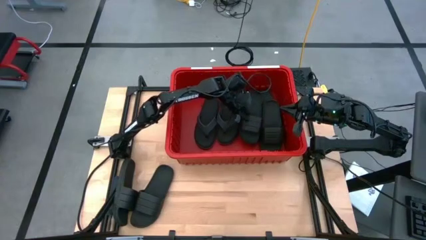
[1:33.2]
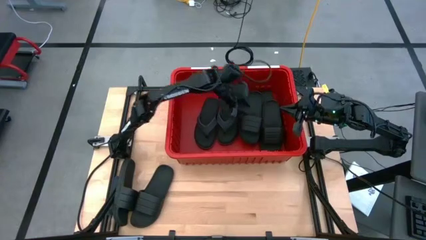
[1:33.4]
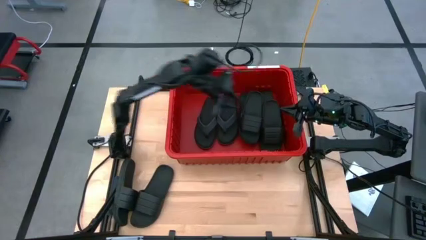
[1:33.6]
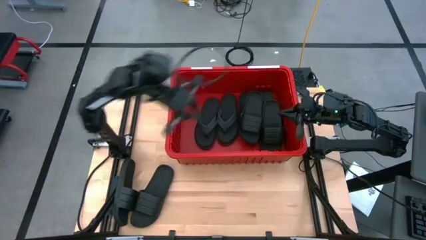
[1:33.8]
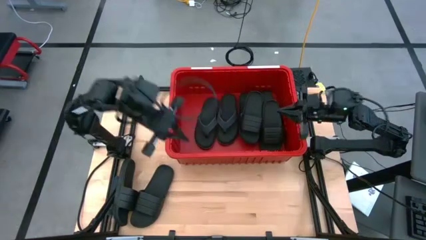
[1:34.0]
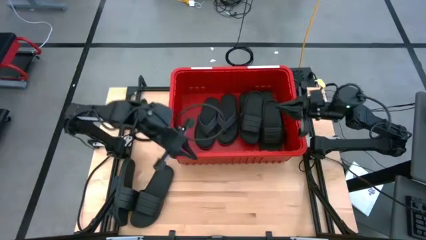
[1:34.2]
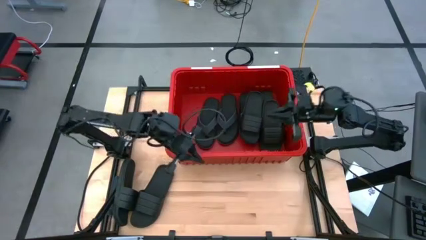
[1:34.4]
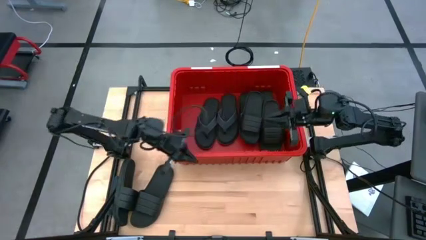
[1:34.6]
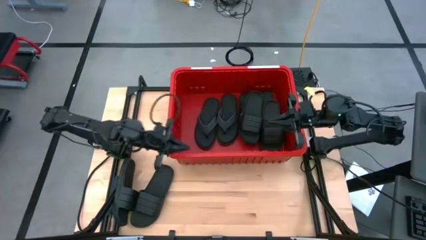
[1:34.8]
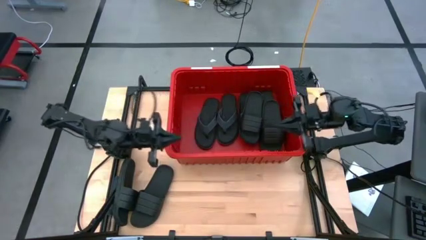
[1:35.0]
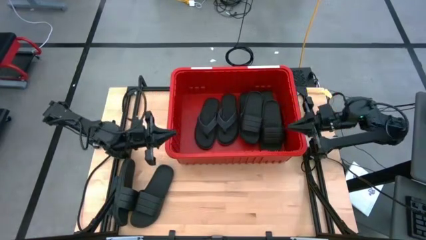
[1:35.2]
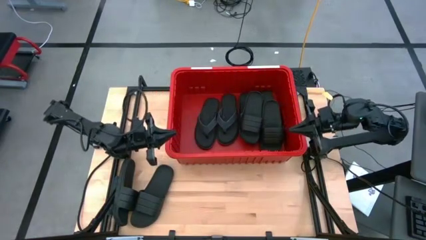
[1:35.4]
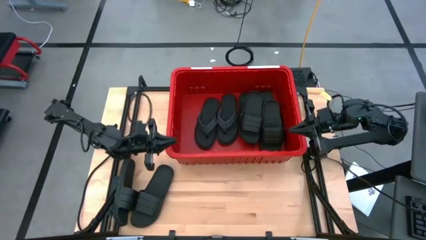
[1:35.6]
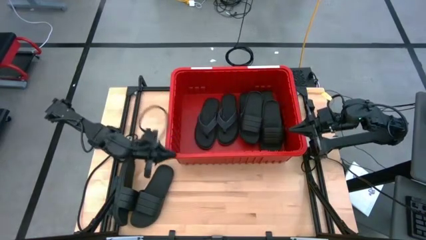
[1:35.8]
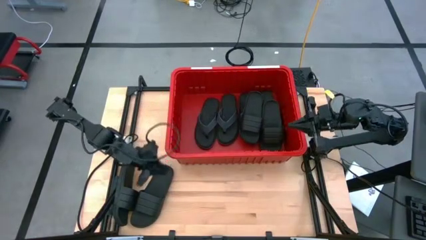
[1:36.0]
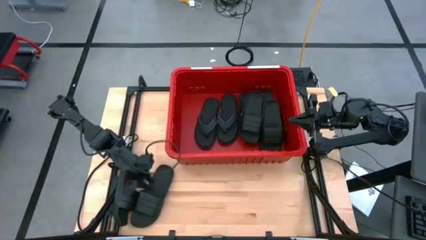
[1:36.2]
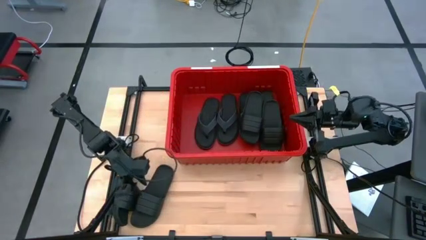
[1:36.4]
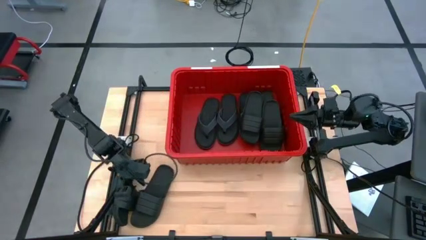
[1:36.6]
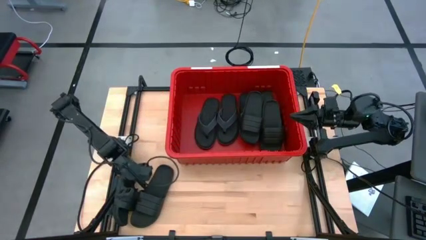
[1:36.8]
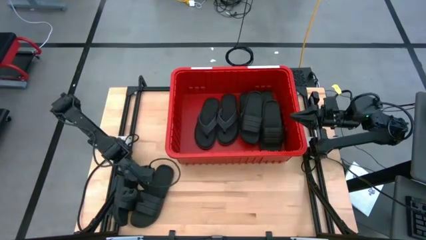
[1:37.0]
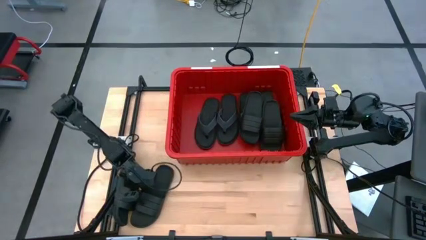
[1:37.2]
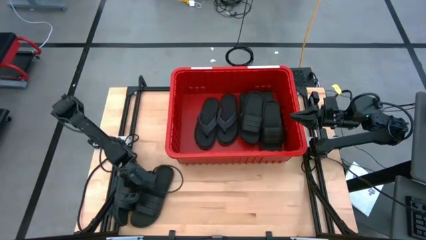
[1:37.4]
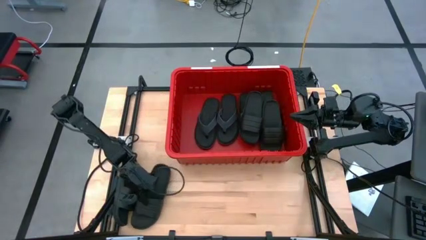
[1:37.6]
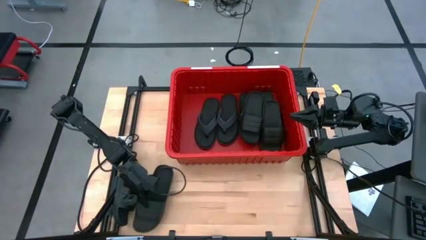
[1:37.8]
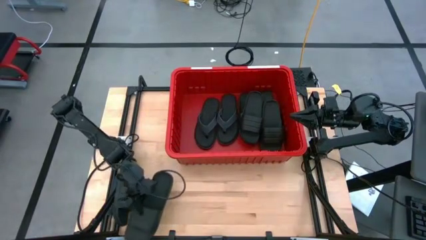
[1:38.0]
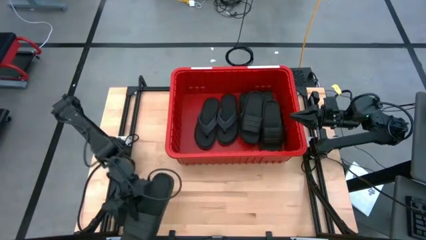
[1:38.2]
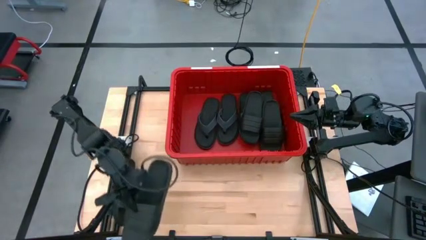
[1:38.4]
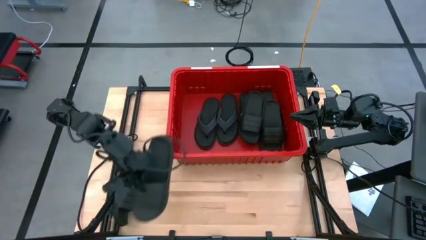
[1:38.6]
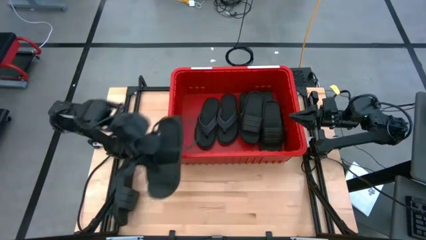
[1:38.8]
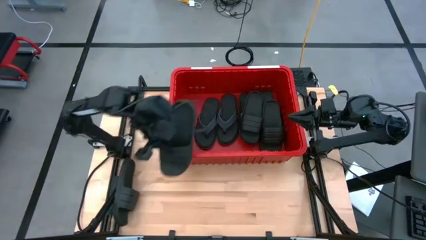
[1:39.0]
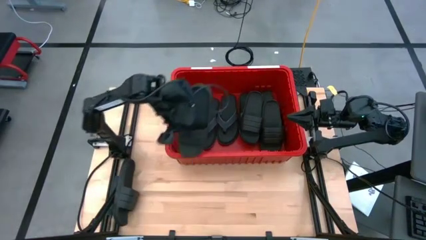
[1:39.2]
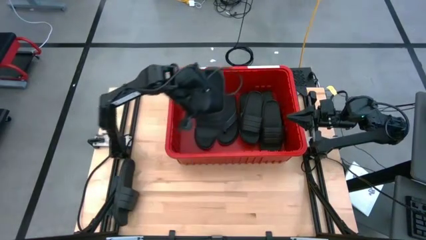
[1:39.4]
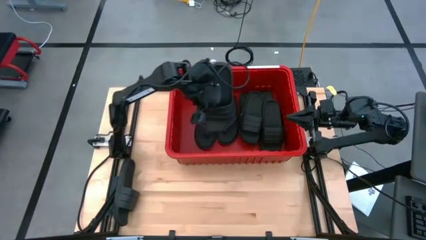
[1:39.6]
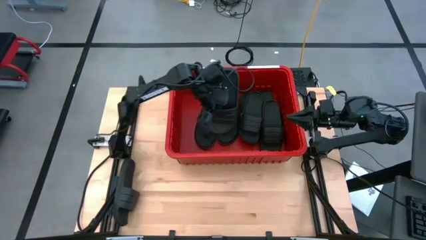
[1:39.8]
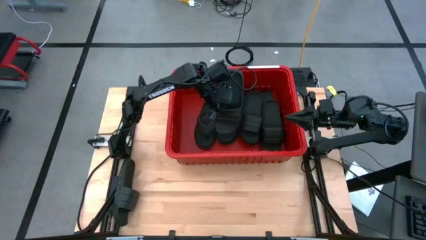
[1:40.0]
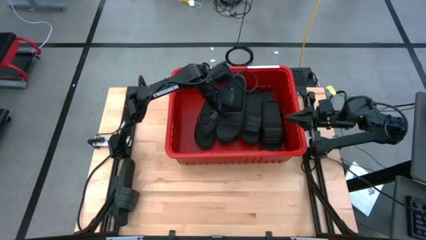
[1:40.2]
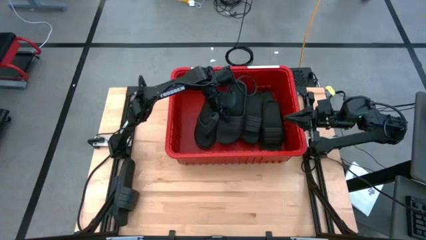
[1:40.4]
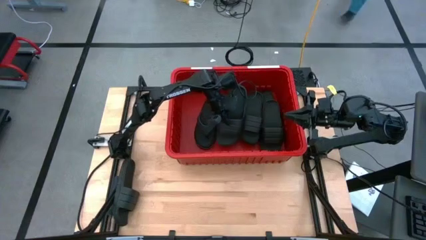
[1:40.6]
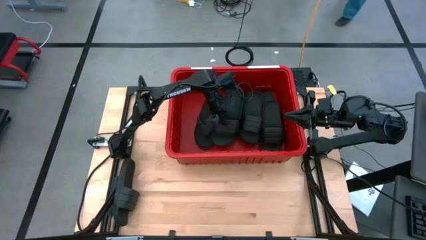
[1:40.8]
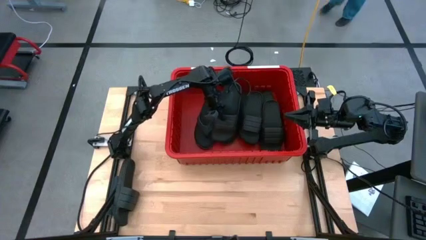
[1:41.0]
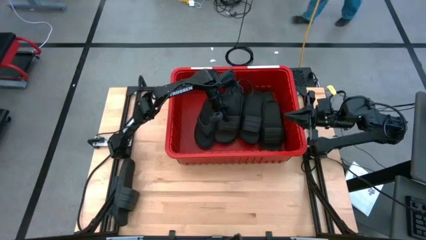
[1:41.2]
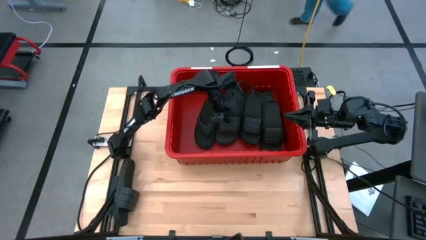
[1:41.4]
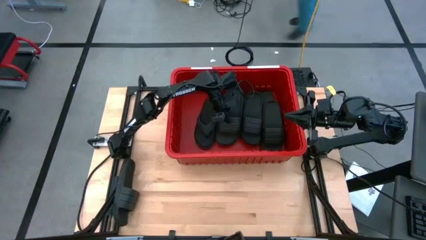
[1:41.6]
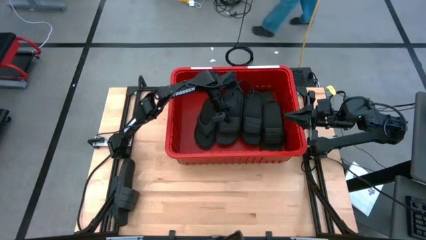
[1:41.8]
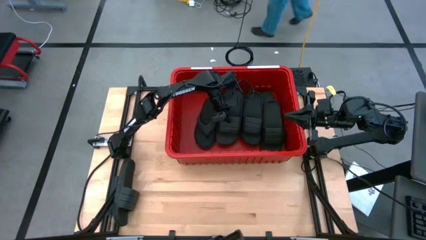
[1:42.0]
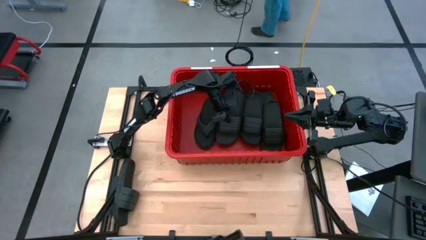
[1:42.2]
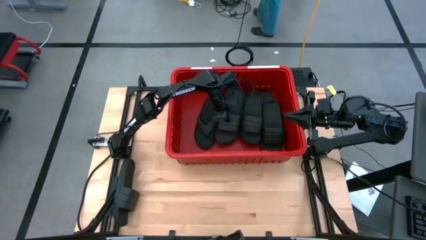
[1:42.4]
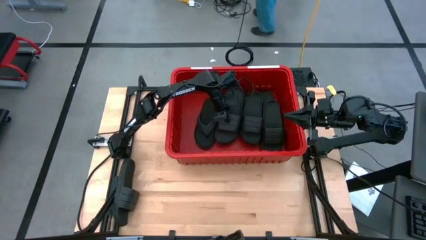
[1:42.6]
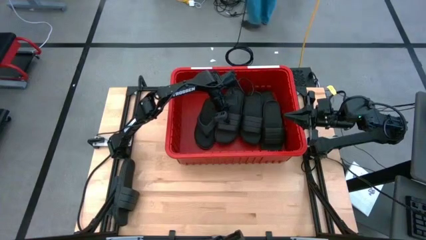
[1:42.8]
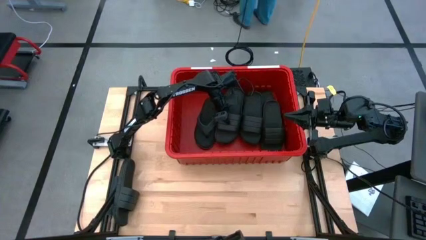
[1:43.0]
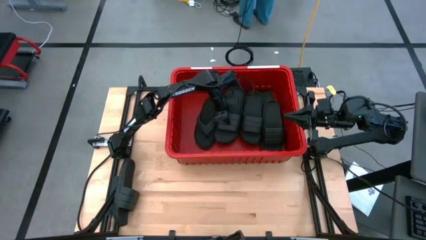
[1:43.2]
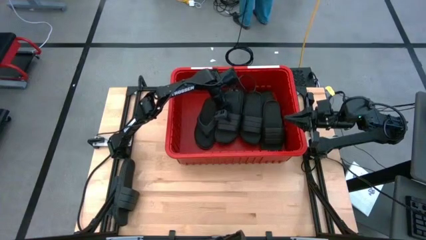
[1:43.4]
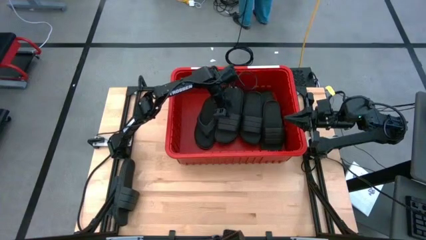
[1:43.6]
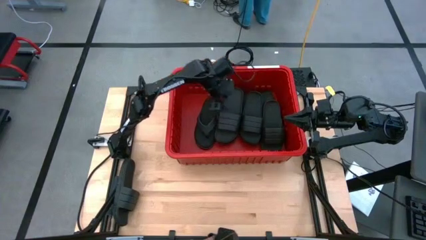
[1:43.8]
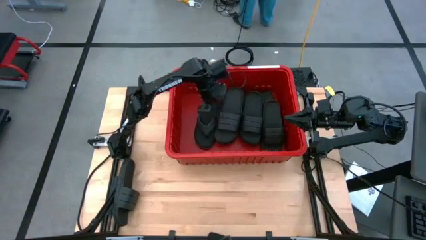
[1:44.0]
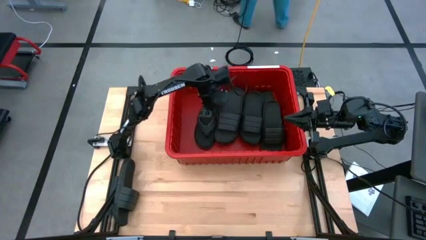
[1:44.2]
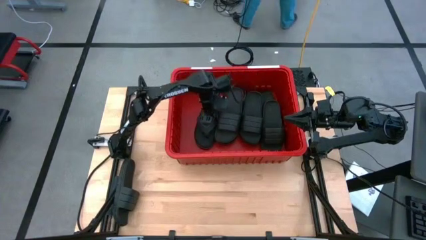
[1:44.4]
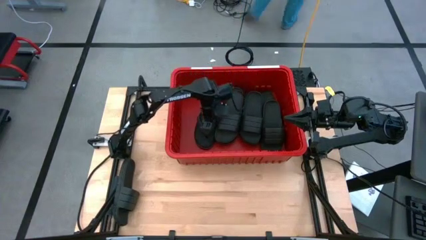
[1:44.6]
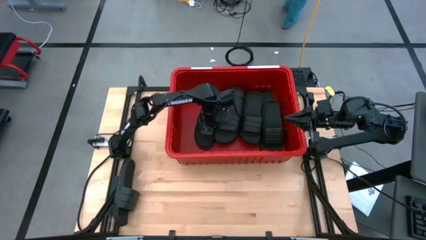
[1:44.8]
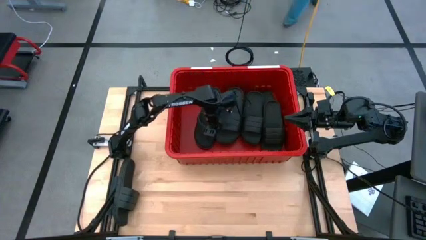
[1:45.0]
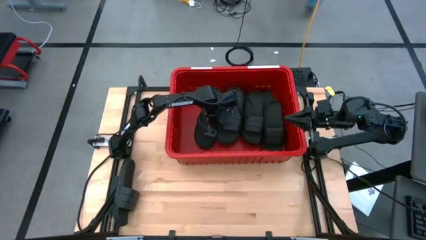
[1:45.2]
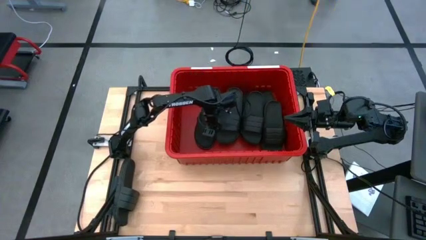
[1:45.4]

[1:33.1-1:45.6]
Task: Pick and place slides into bin
Put the right black slide into the red bin

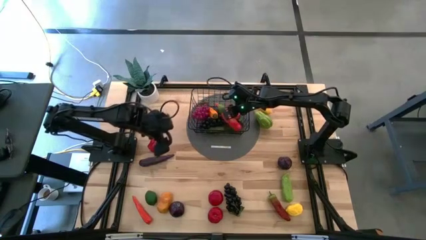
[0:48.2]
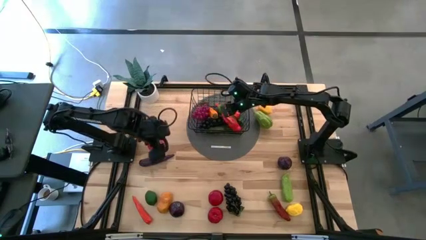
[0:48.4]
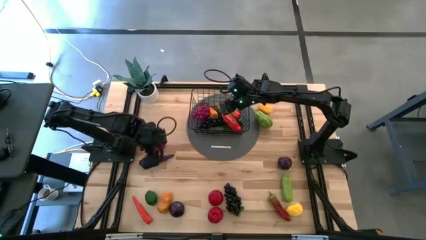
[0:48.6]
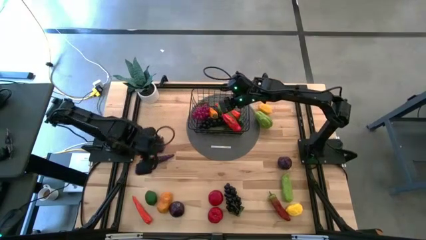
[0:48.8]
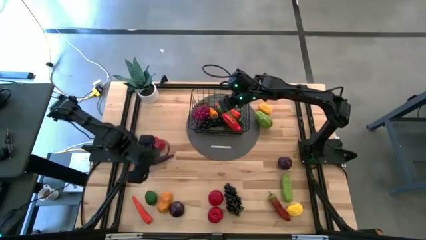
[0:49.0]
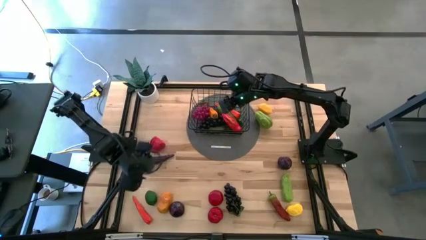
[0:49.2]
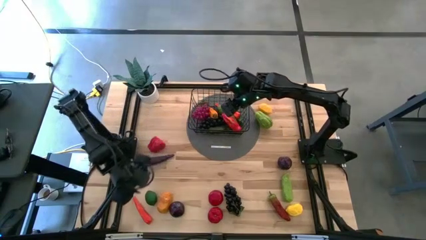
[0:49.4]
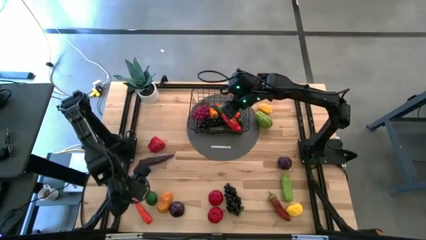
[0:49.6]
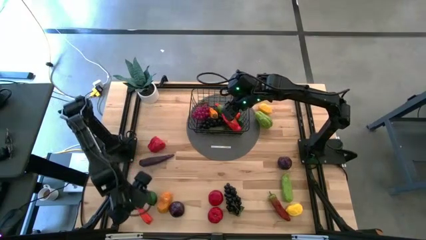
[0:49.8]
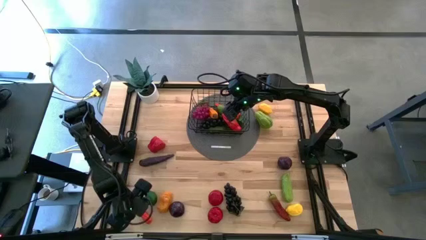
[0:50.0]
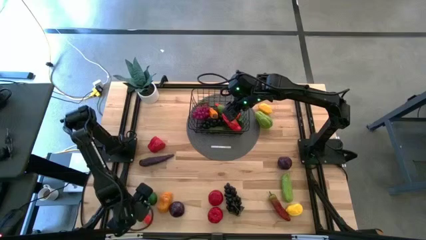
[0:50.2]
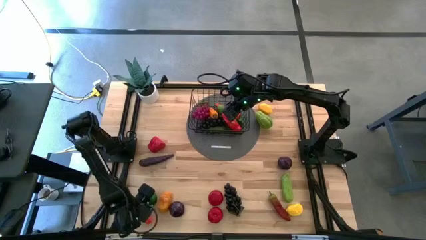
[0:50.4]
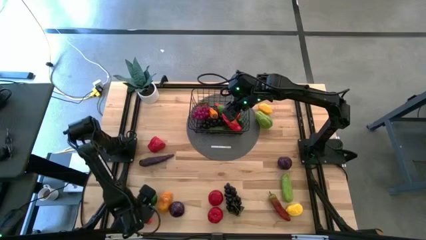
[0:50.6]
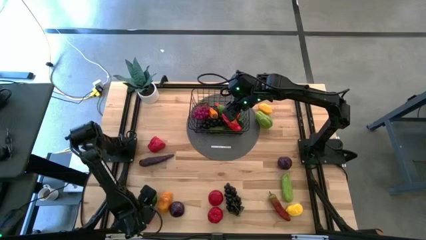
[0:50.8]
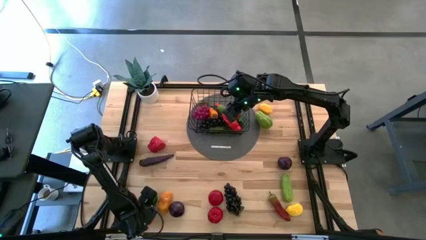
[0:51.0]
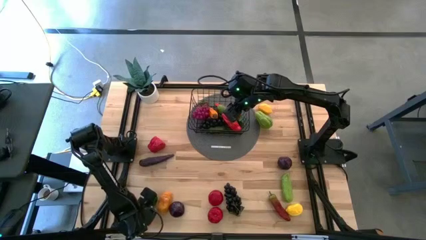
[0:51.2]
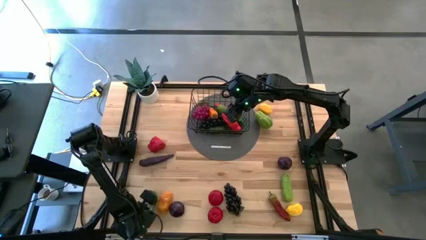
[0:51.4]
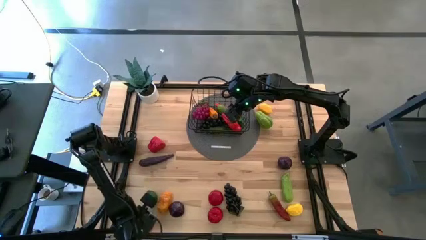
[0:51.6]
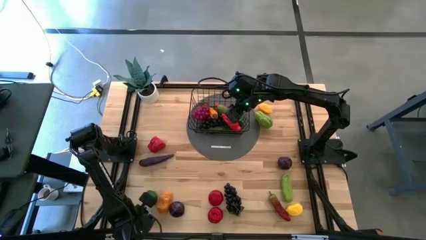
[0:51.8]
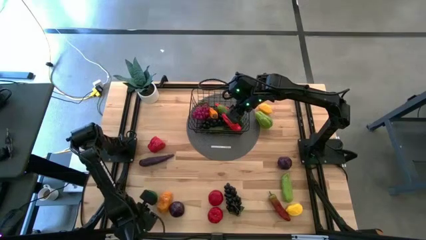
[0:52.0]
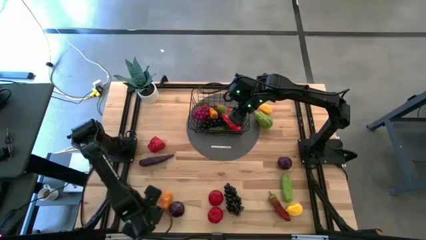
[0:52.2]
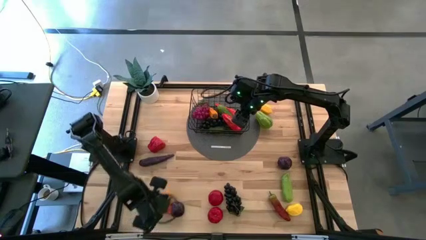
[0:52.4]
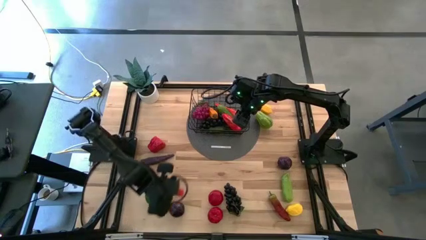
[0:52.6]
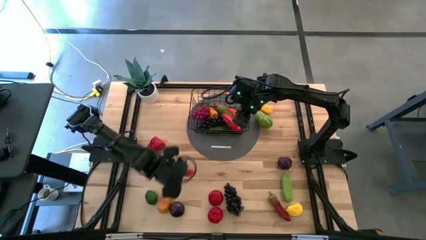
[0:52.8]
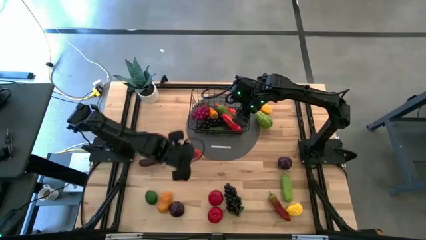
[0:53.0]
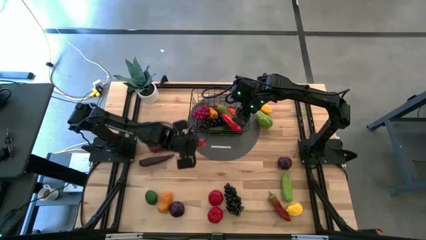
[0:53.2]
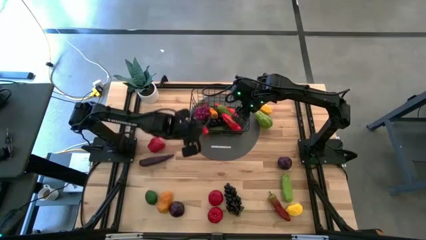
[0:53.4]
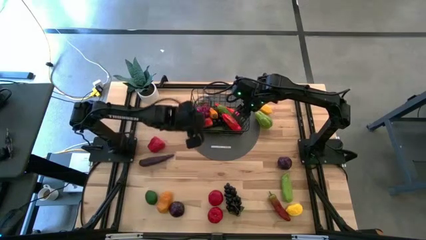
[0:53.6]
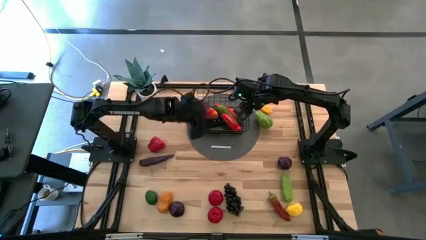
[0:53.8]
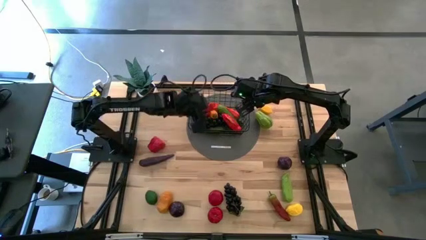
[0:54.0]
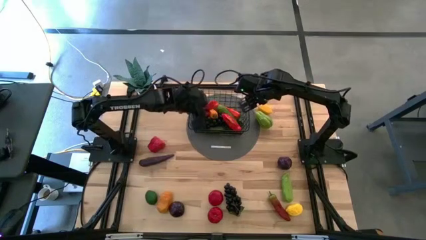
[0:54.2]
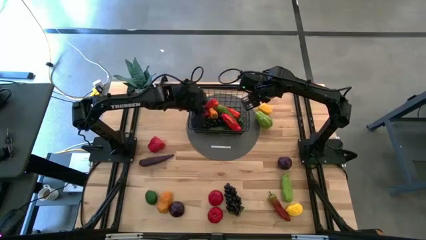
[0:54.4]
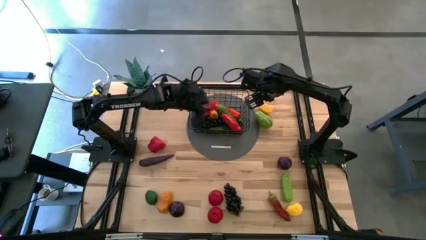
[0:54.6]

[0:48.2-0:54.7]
Task: Build produce basket
Put the orange carrot into the wire basket
